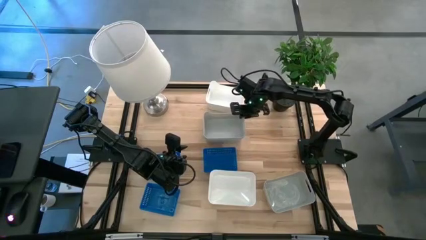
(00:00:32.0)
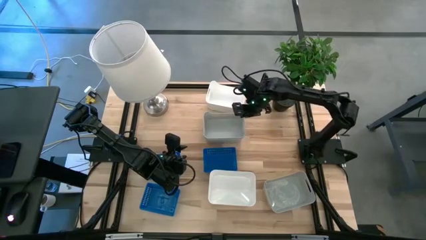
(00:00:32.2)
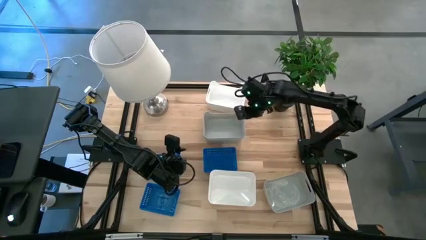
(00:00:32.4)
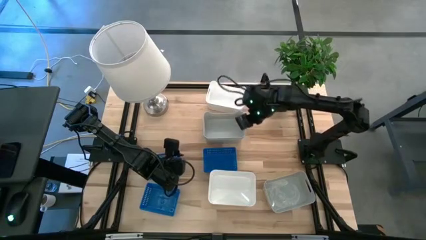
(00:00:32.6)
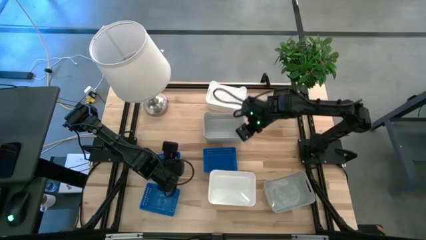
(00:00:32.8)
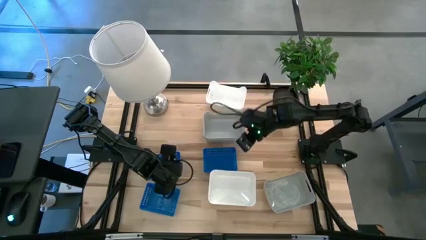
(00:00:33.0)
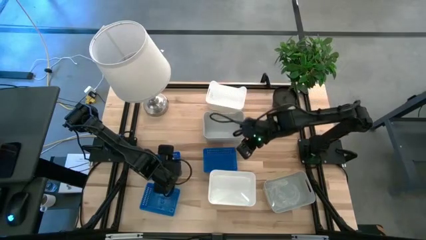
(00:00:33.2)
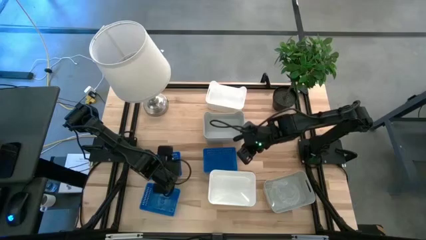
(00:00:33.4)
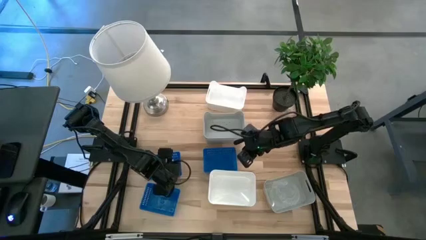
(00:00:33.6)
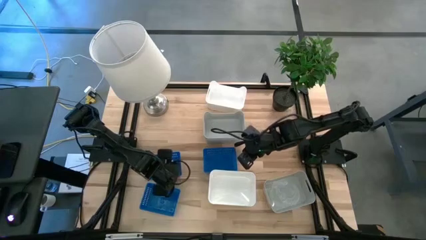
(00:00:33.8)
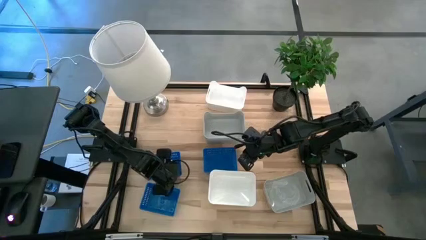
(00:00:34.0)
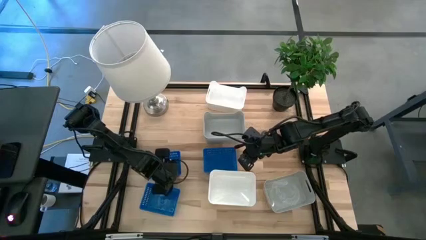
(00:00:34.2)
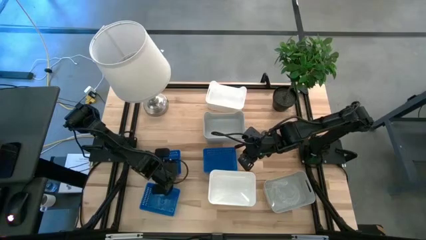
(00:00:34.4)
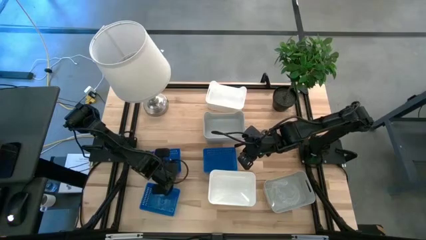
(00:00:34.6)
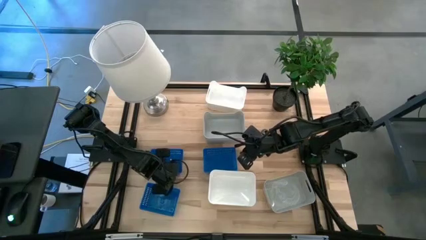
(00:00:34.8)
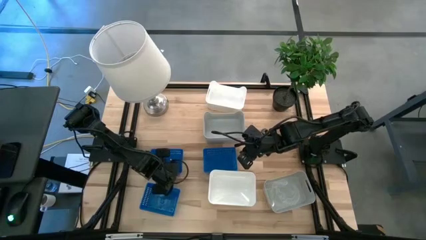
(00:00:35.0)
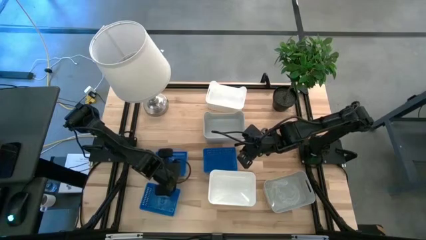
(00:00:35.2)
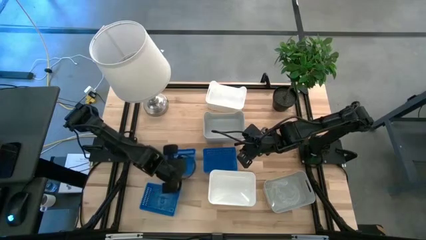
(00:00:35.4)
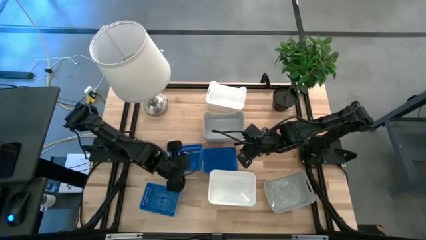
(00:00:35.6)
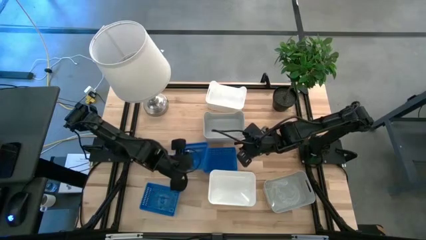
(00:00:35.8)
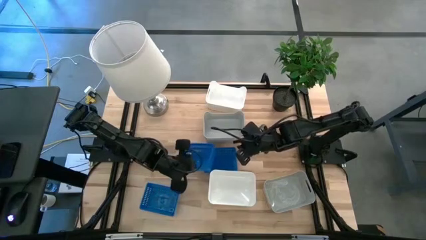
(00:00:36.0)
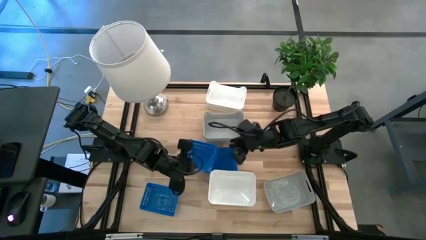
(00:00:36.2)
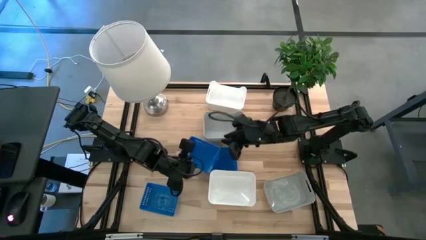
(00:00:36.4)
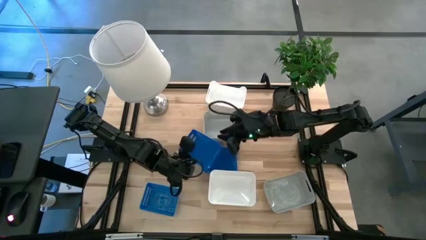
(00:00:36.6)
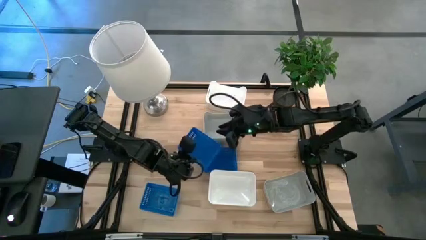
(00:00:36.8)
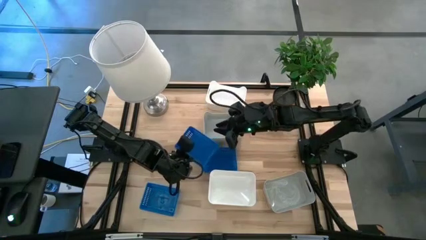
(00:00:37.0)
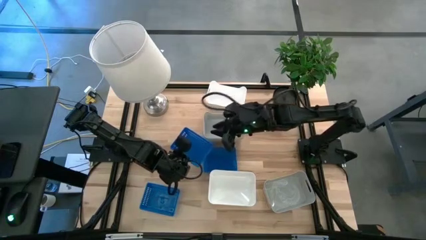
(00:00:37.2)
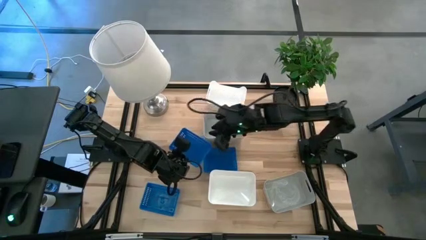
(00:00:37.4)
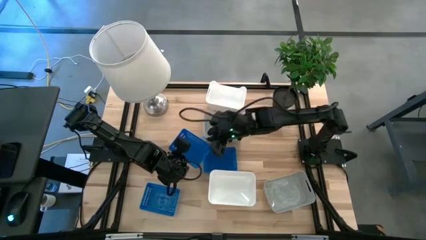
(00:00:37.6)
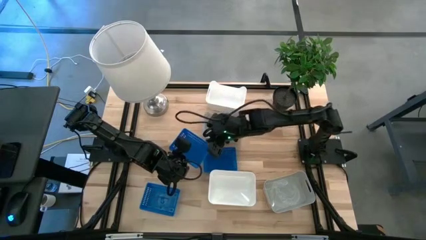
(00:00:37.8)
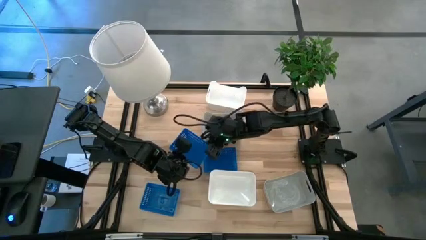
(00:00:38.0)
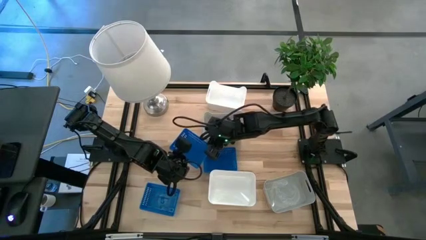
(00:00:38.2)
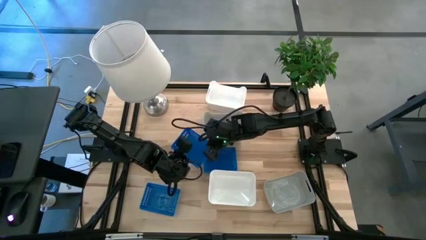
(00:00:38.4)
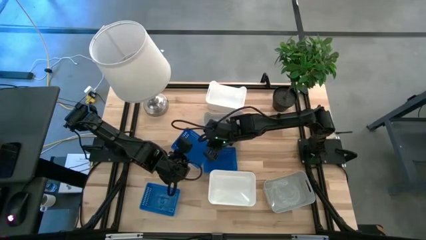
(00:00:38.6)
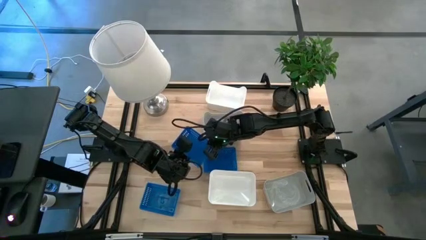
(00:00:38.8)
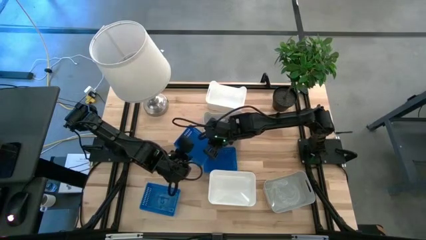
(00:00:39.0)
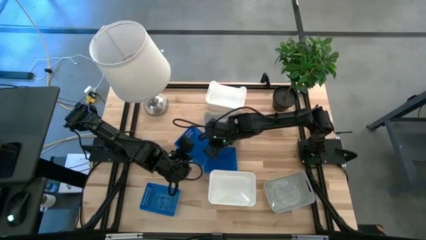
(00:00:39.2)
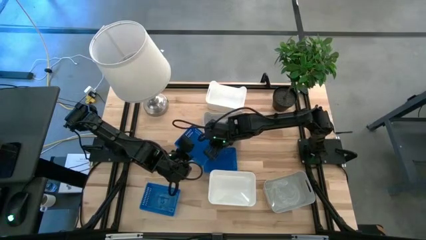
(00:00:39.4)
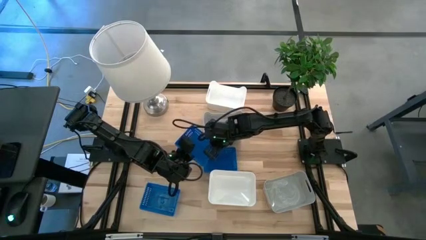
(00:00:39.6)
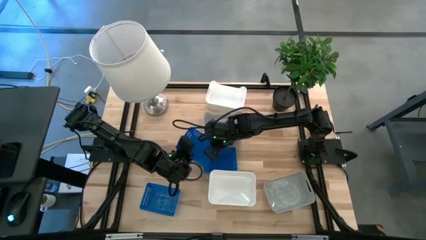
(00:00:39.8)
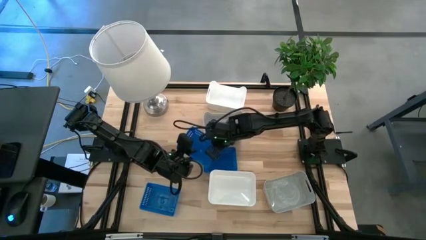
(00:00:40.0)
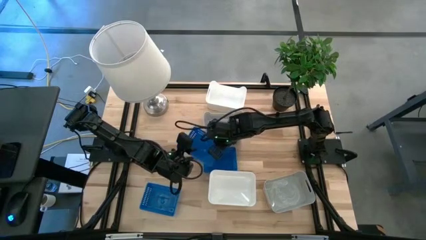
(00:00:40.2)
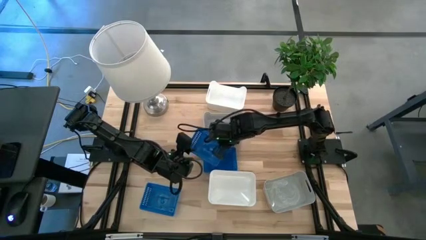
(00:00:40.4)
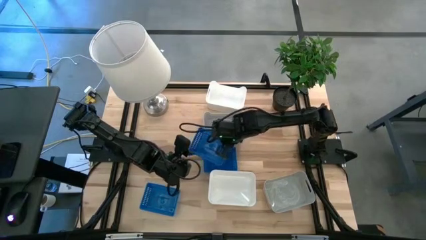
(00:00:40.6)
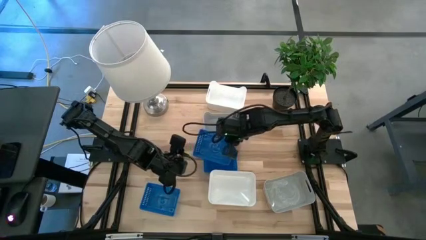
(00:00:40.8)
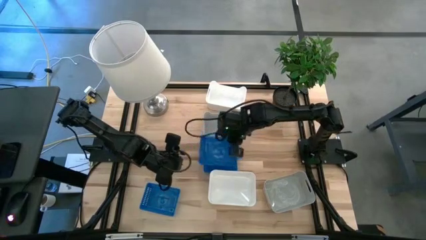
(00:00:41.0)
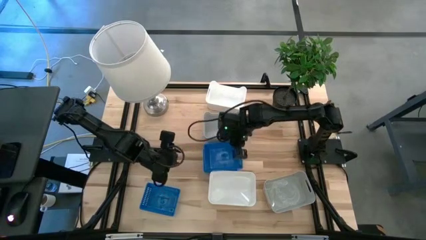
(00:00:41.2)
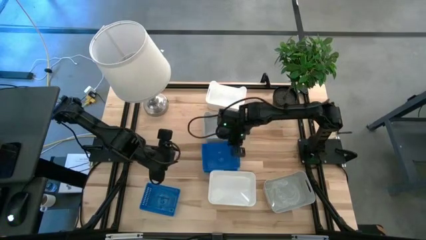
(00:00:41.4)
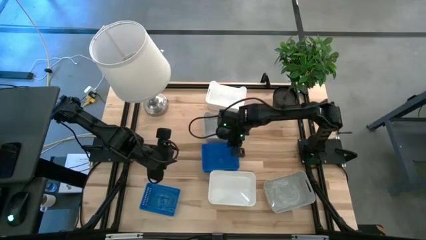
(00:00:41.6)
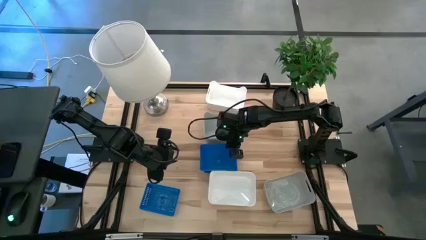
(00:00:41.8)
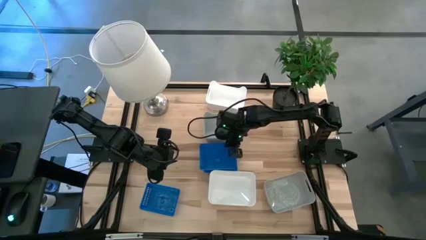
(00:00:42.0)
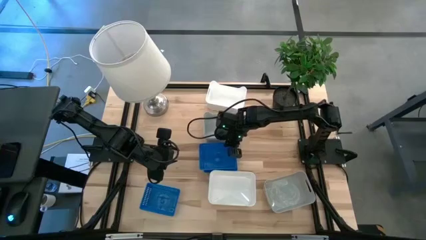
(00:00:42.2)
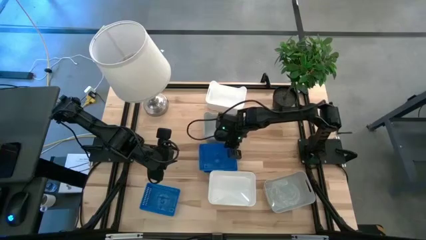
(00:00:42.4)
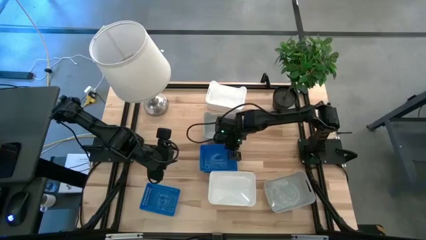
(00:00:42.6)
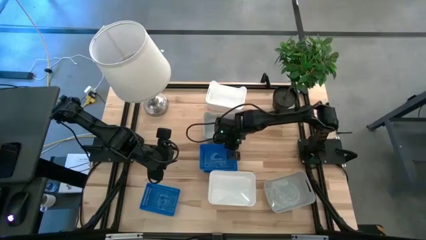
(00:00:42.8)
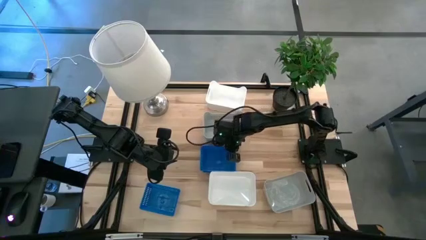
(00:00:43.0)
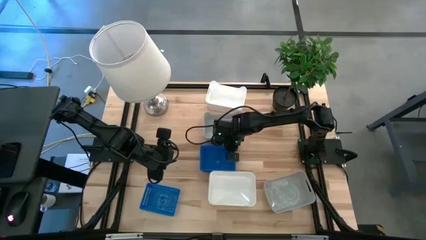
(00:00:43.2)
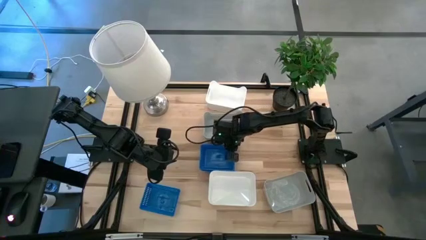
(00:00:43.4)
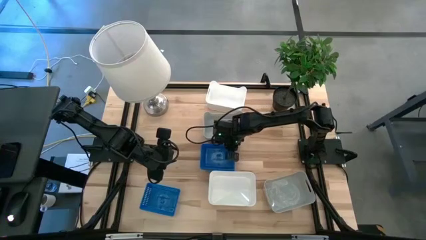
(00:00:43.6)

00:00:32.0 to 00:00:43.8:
Stack the top left blue bin on the top right blue bin

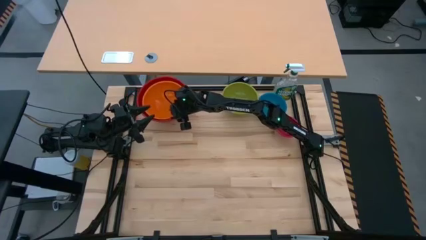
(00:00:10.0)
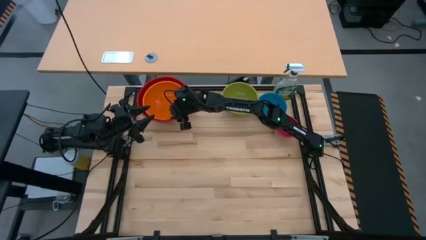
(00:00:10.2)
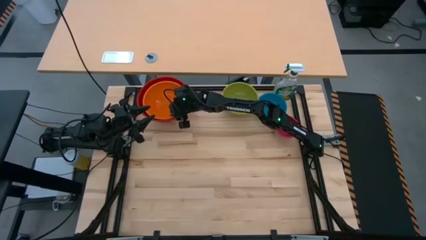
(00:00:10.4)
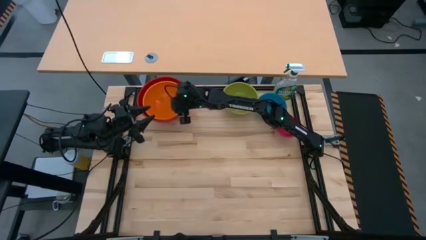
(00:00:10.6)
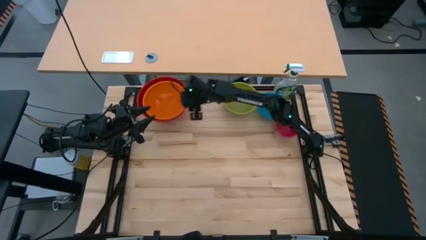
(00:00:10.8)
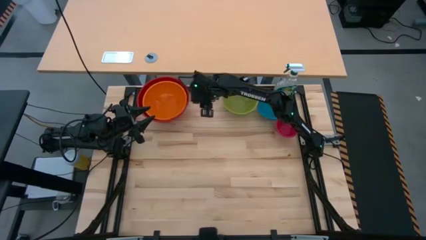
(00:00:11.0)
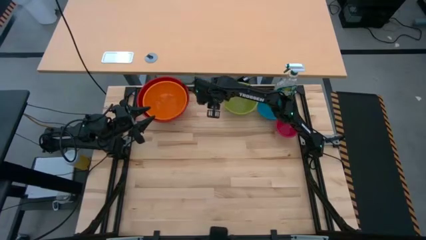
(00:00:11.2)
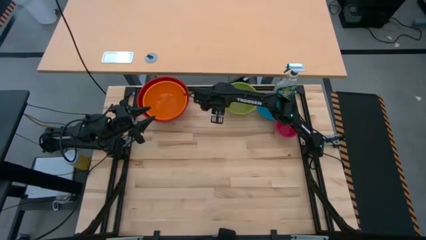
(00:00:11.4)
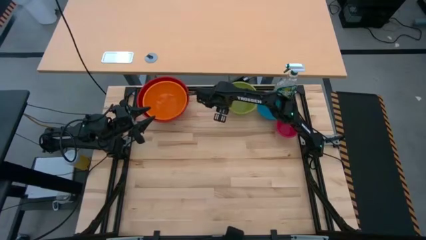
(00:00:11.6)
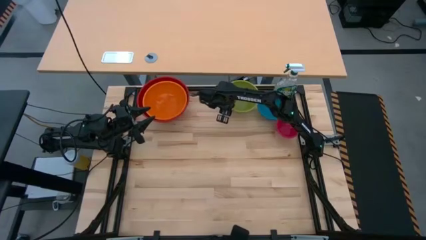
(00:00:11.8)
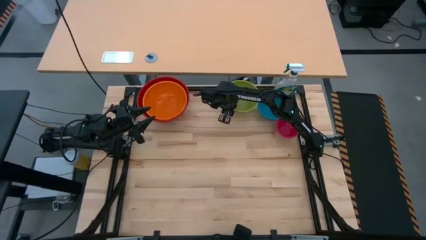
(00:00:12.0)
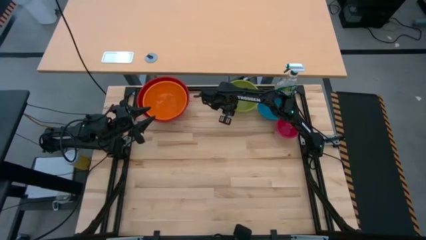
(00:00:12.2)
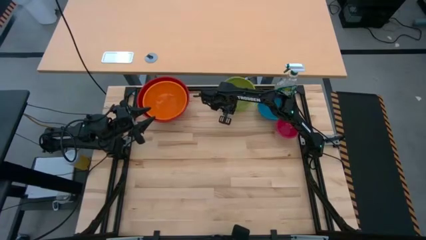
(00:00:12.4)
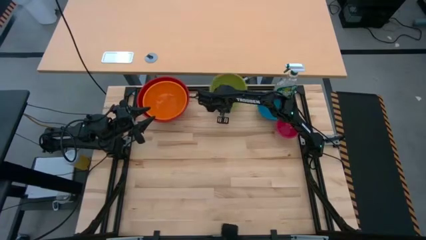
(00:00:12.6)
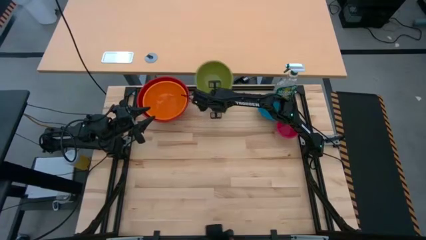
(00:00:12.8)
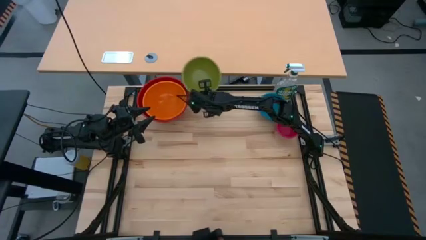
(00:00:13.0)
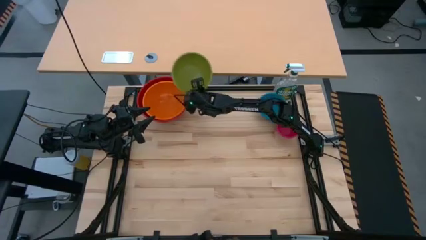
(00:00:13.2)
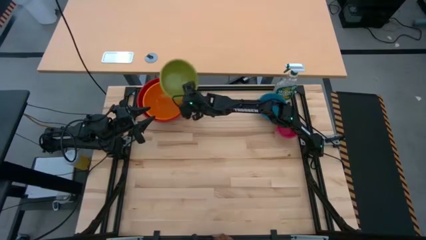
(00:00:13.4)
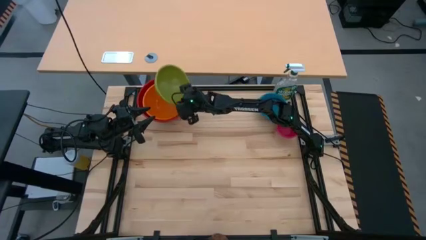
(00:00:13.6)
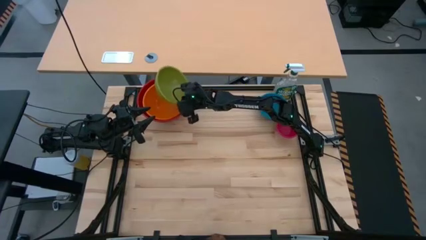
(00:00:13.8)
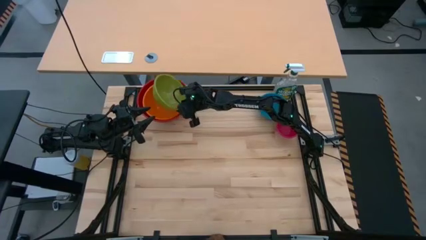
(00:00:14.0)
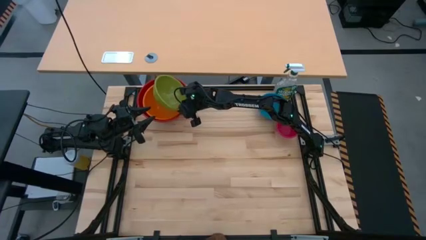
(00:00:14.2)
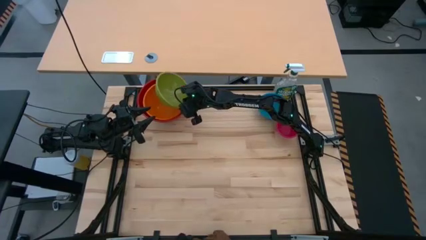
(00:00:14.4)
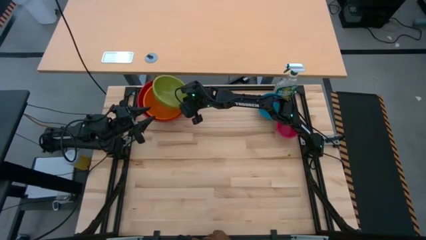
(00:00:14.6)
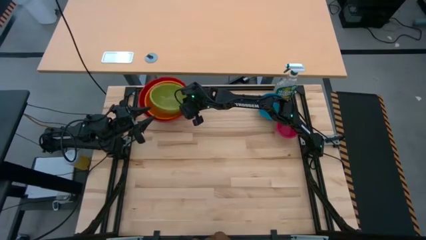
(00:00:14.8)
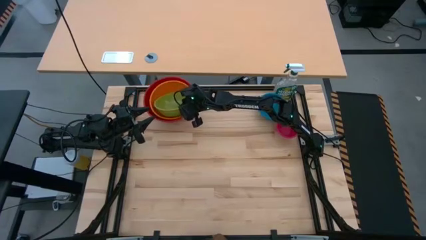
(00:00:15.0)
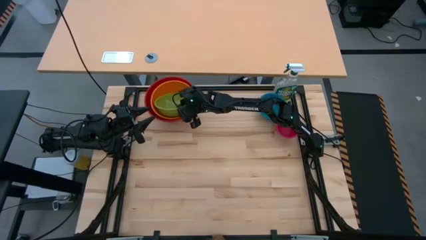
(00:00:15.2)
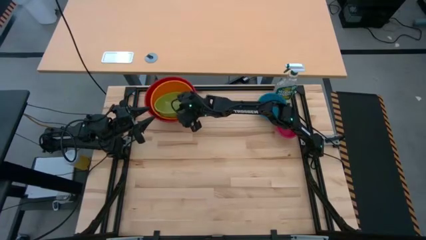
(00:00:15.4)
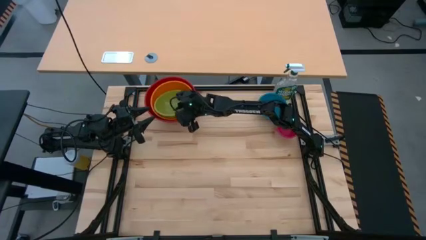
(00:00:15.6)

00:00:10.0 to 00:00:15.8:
Stack the green bowl on top of the orange bowl
